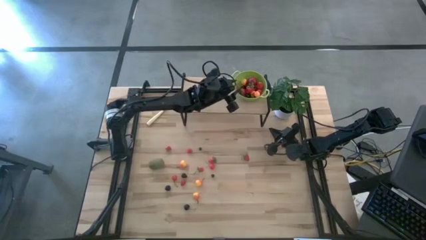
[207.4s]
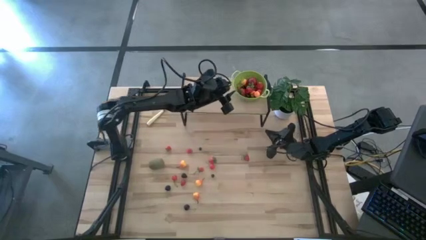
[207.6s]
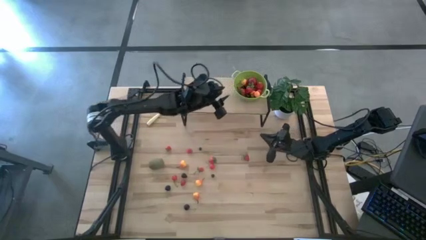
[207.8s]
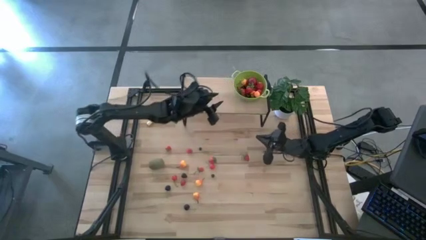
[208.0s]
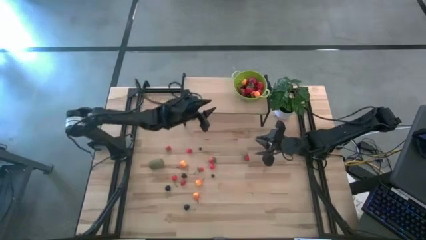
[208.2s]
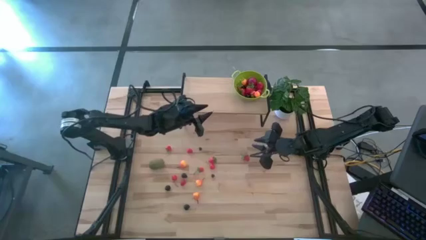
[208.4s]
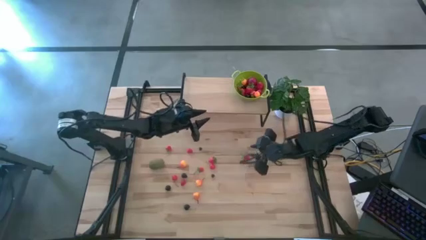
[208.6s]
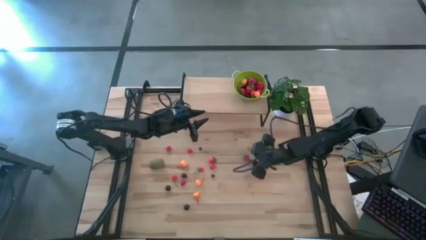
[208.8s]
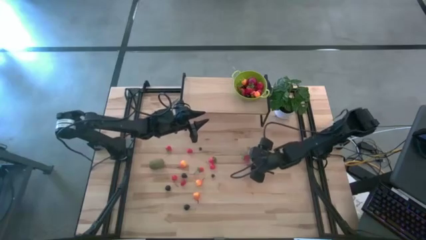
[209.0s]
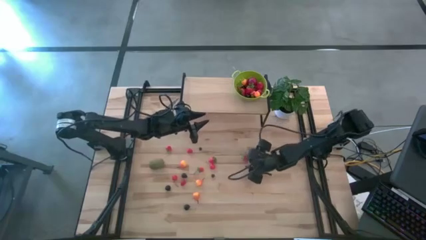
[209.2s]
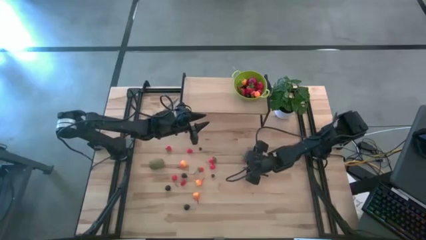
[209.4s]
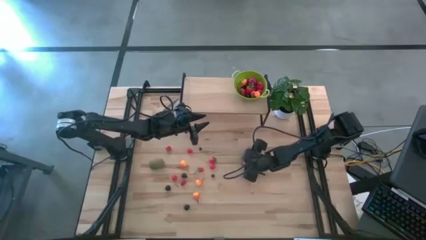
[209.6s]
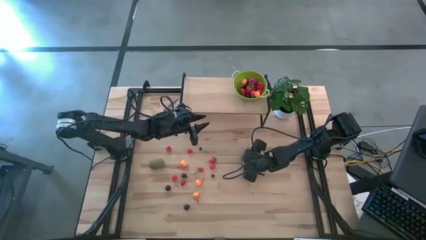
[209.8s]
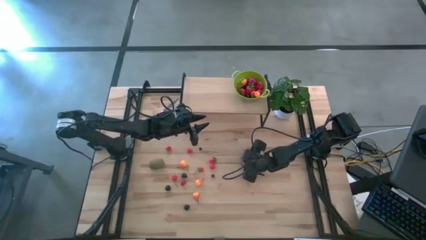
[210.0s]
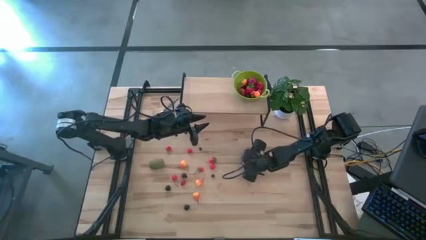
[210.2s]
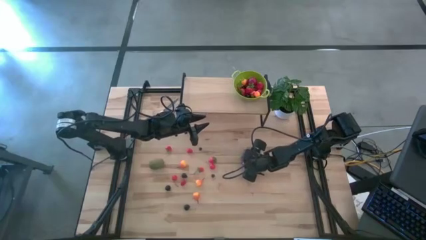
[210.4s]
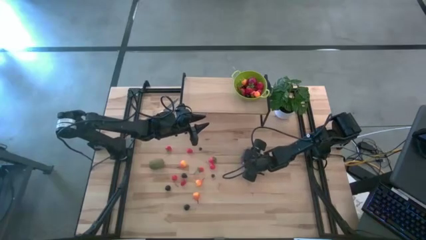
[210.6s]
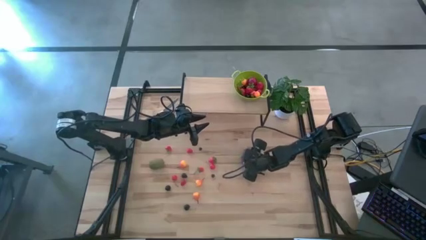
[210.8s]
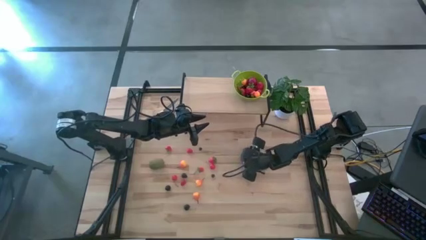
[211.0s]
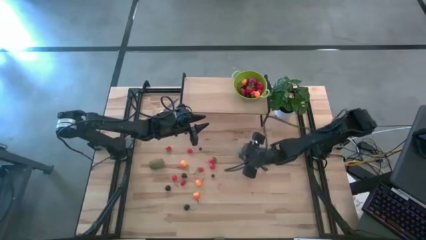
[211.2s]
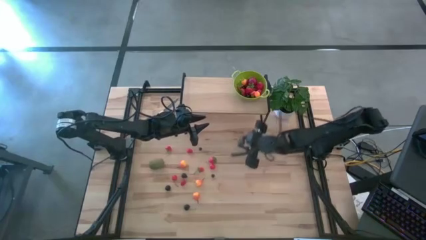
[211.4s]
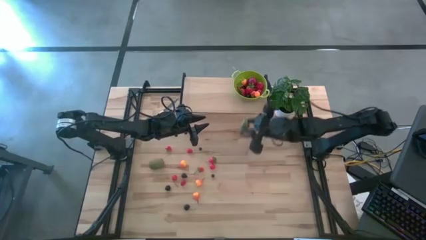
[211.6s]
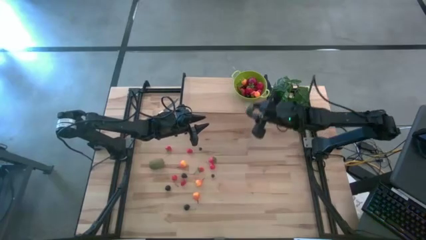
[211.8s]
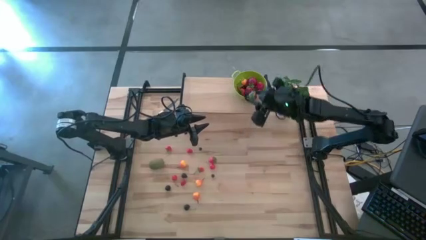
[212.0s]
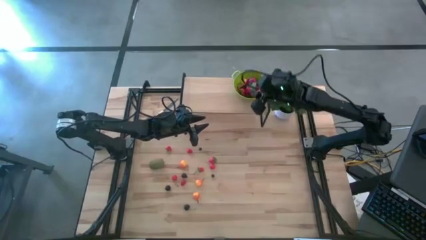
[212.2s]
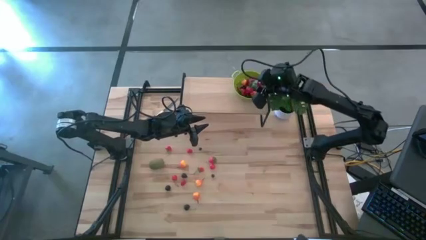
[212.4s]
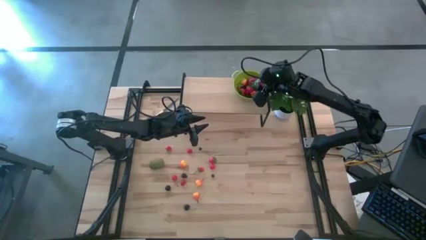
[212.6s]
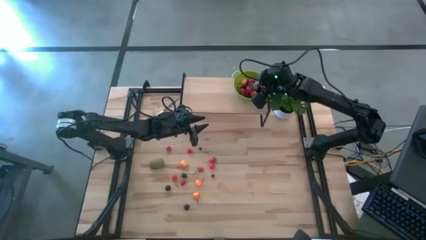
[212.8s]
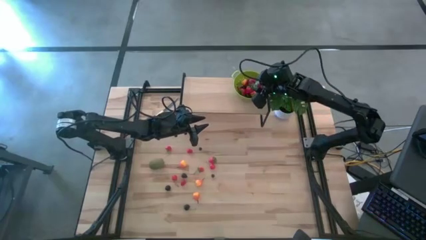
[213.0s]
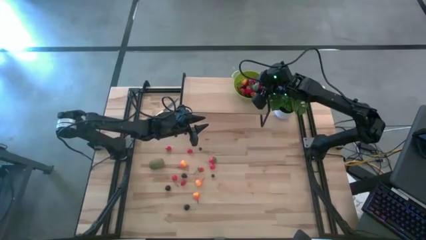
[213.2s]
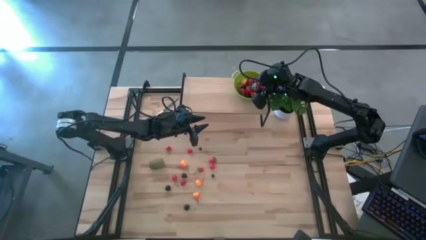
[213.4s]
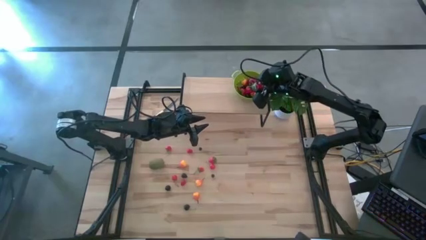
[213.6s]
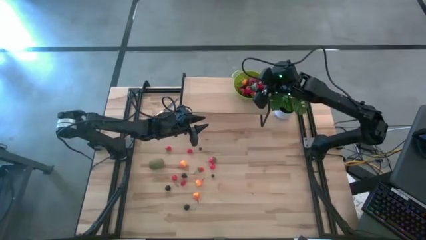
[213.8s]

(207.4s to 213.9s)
Task: Build produce basket
Put the strawberry into the green basket

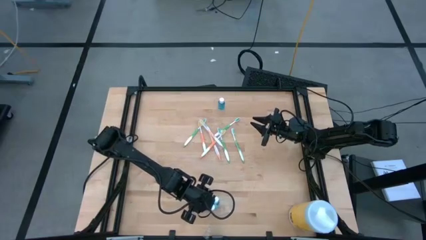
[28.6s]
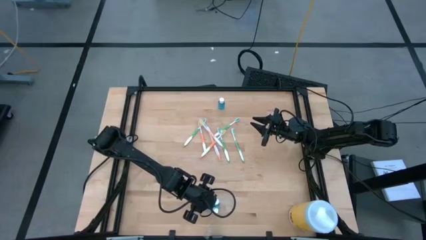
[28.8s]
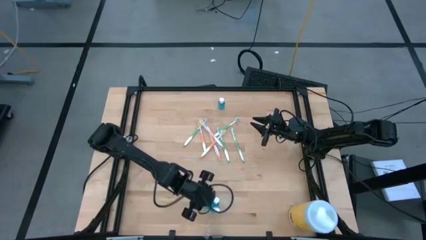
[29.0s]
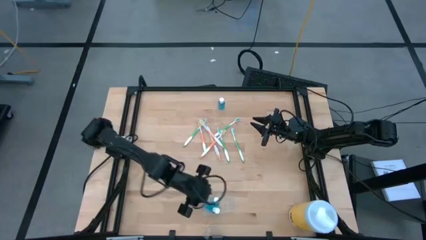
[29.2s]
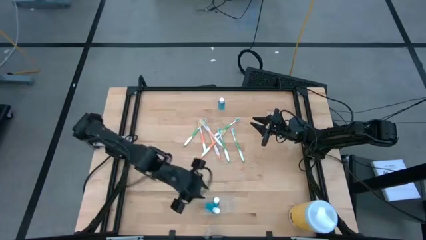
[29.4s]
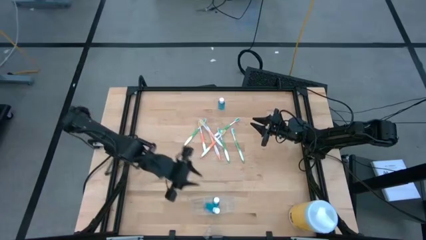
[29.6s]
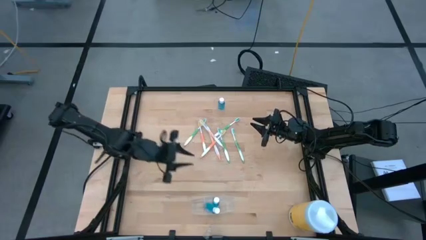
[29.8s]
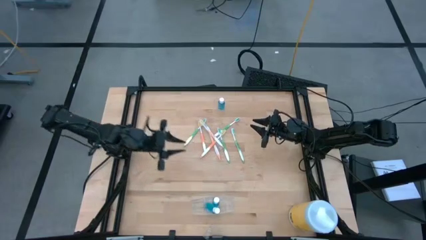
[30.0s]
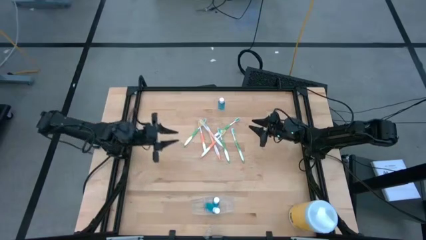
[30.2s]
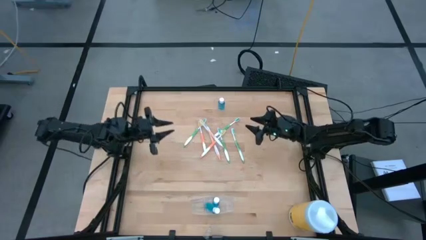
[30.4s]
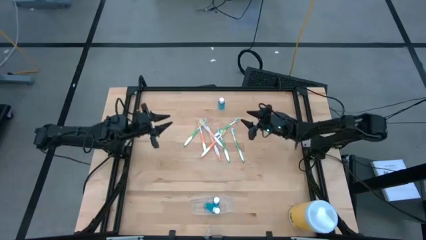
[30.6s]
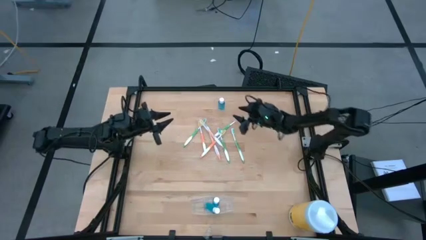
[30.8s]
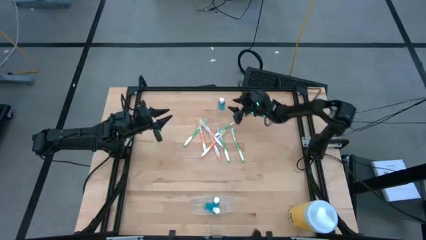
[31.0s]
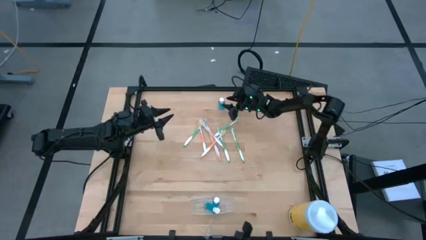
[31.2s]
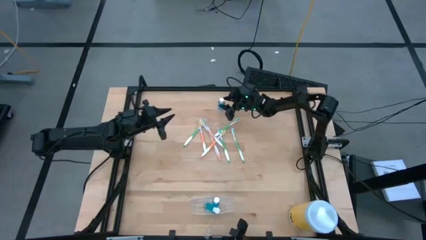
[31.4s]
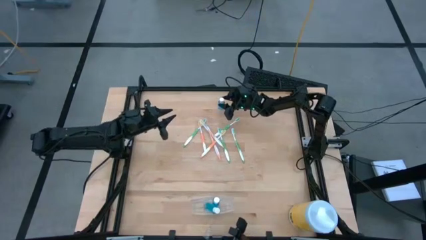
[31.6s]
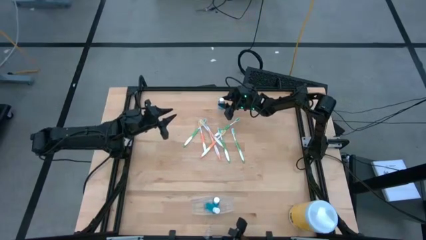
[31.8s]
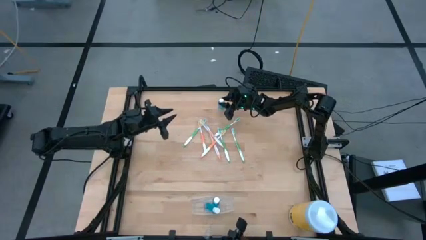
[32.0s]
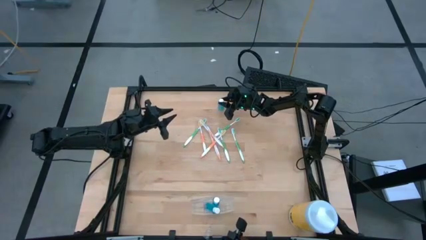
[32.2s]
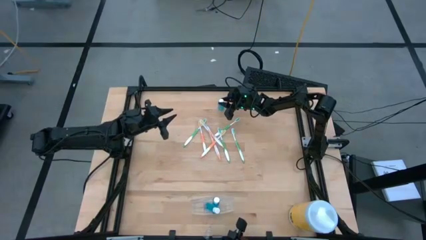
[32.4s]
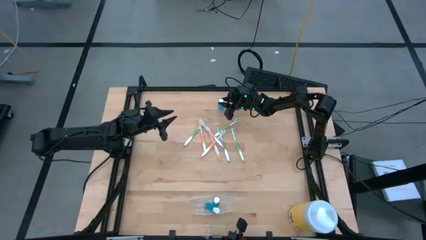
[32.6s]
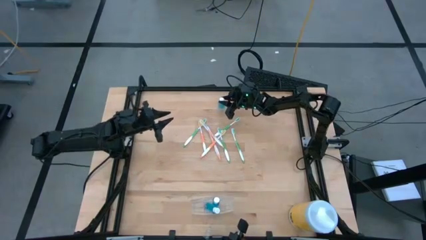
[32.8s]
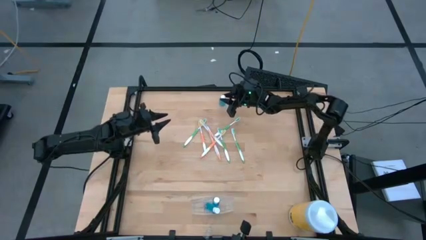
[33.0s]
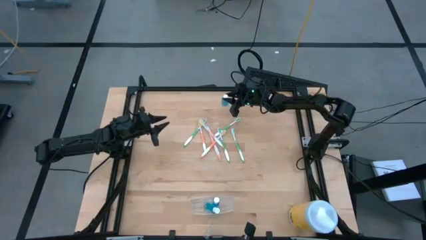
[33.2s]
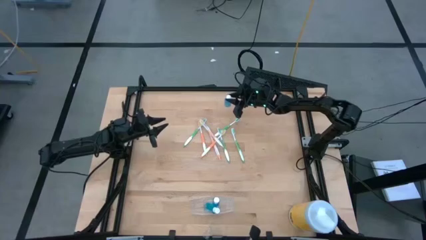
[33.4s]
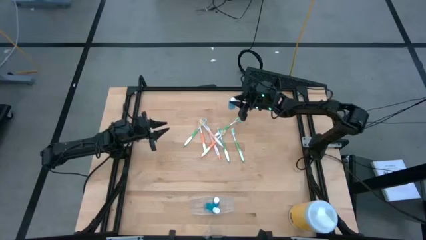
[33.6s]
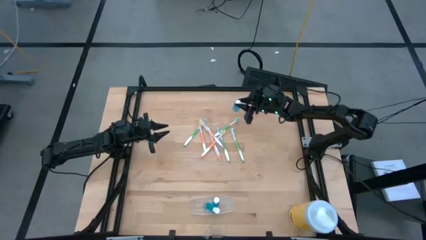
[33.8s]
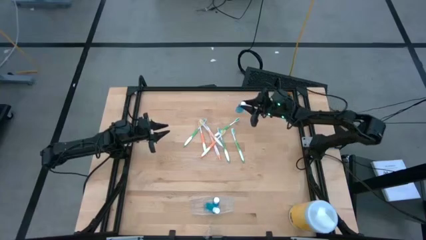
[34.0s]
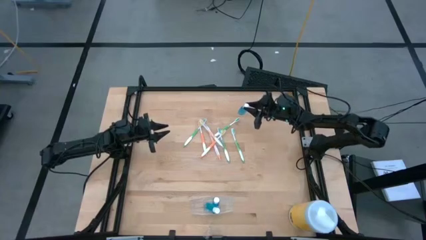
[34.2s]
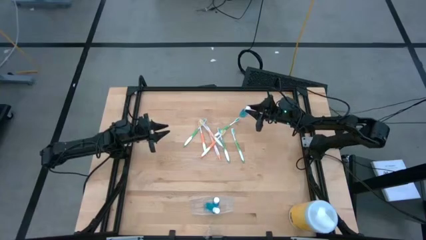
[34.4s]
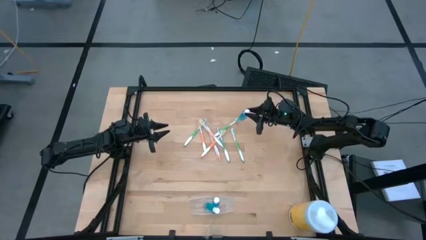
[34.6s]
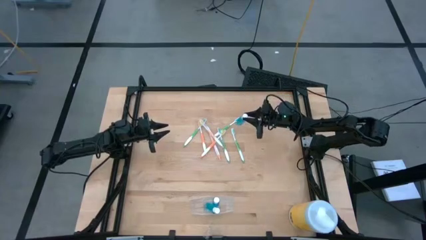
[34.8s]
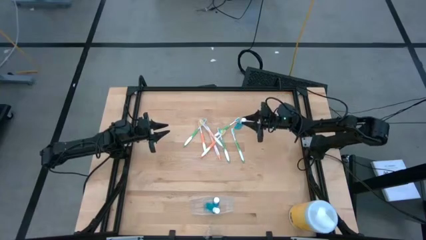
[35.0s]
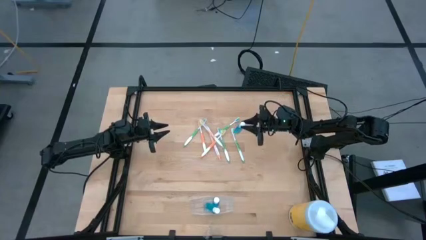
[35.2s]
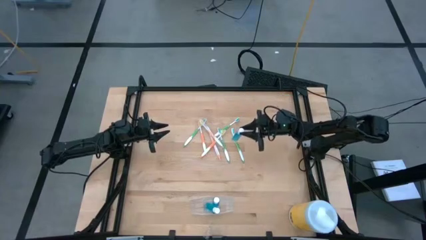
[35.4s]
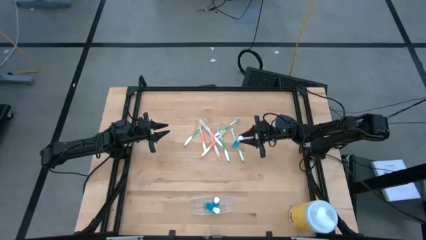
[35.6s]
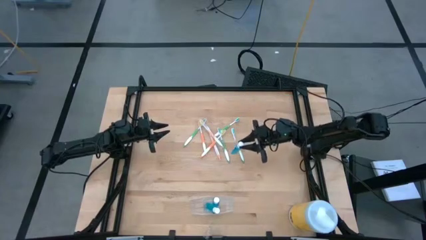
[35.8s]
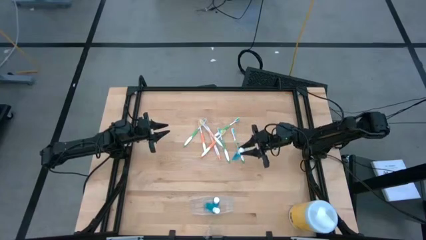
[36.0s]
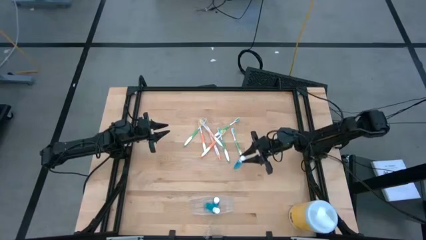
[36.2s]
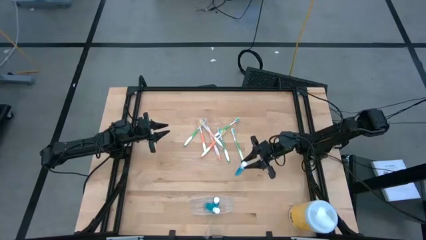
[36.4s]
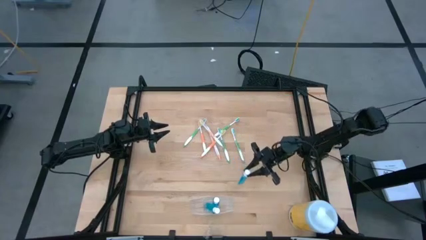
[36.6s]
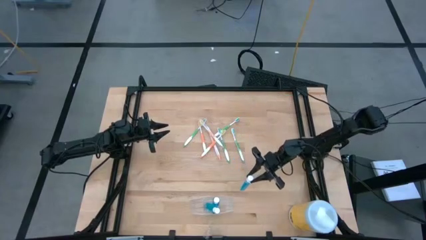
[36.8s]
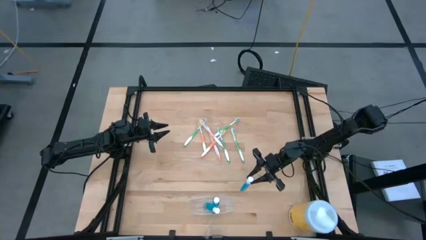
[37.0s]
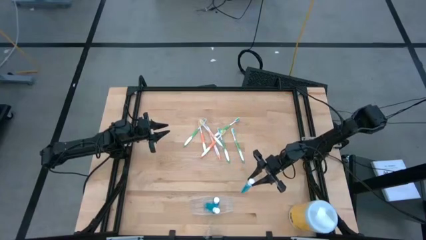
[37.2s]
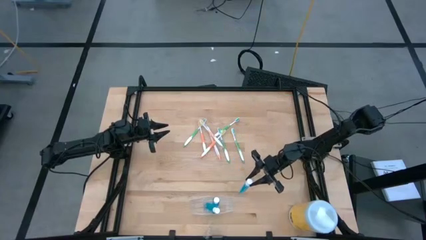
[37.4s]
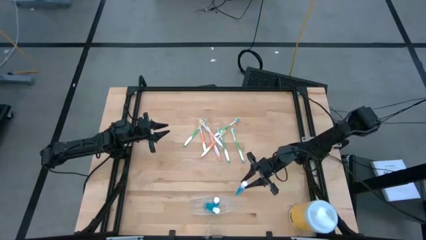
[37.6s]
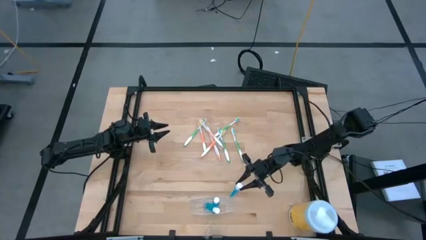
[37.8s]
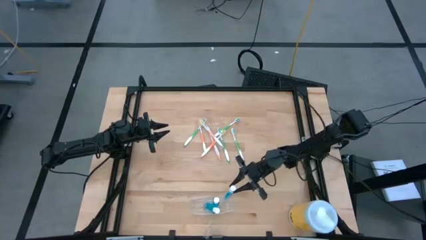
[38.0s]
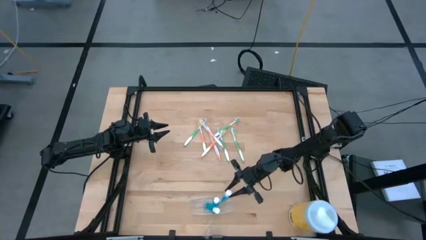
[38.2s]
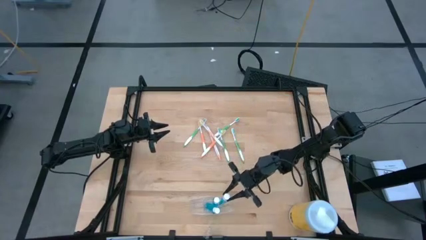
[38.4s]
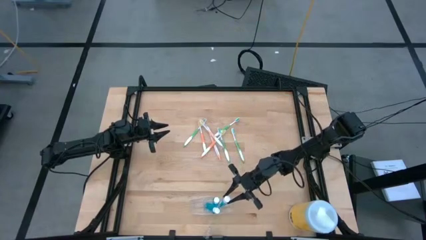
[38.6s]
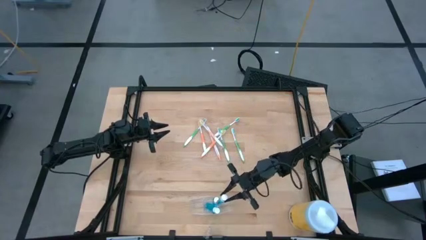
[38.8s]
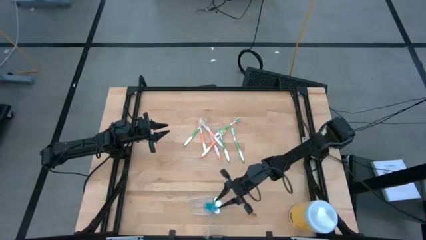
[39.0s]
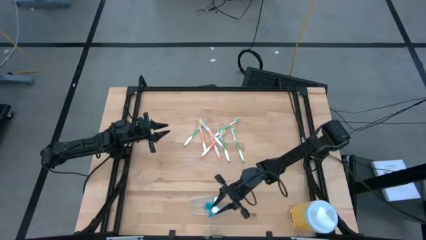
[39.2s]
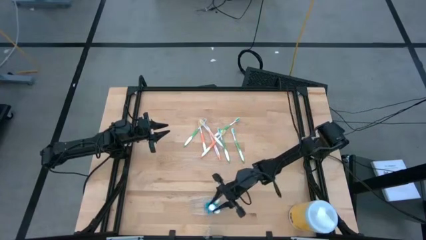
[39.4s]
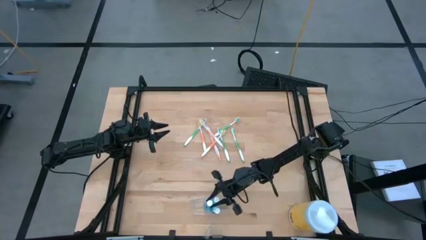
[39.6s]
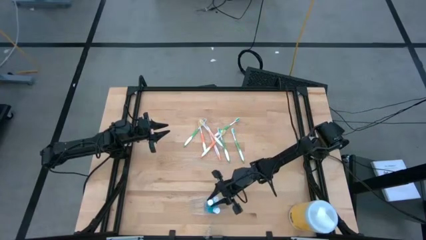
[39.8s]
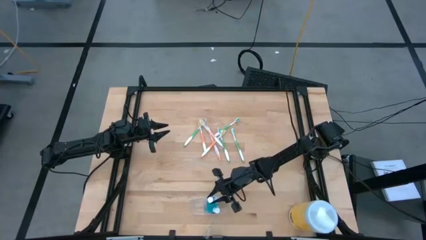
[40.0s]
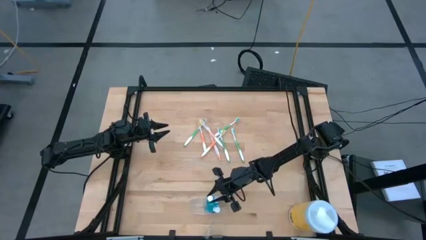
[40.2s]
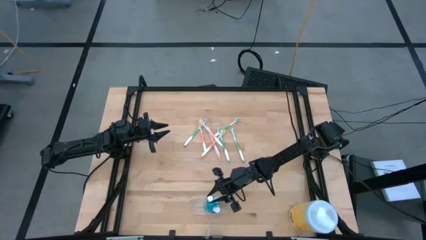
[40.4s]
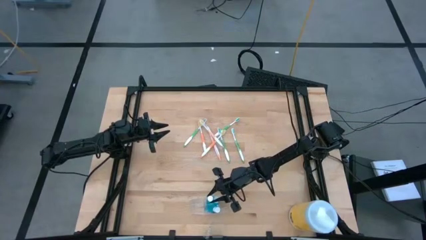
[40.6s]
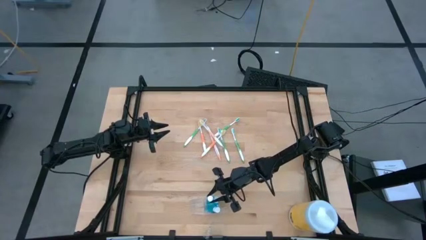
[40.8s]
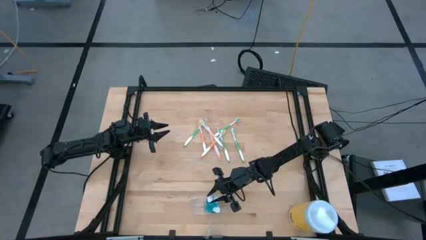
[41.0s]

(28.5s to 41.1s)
Task: Pick & Place toothbrushing station
Put the blue mouthwash bottle into the transparent organizer
